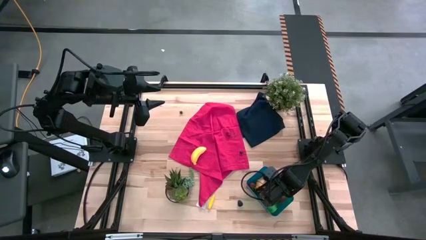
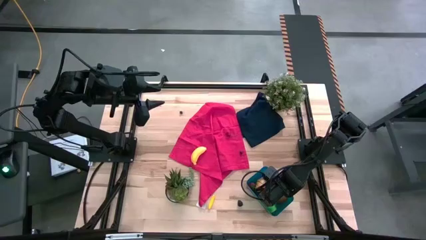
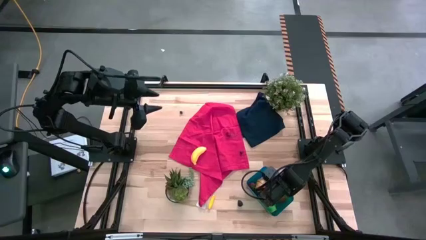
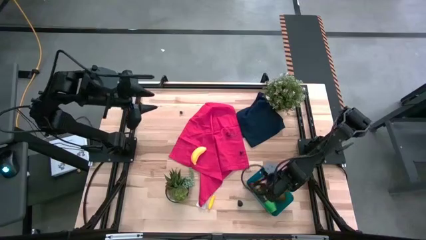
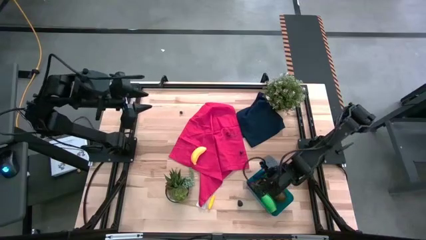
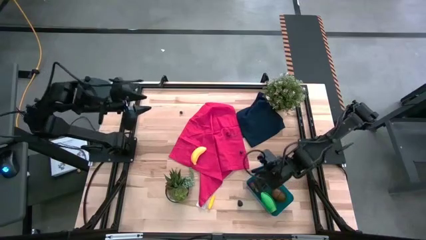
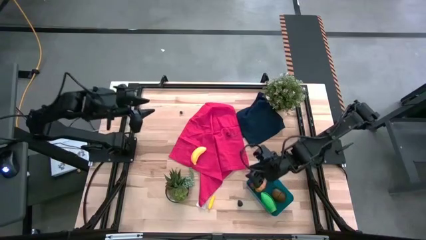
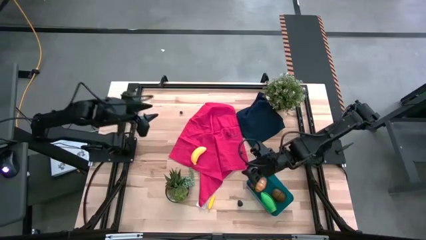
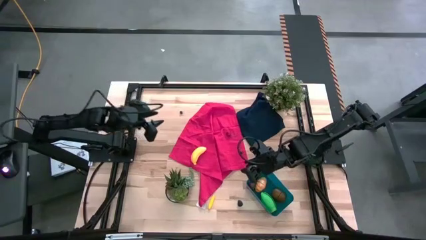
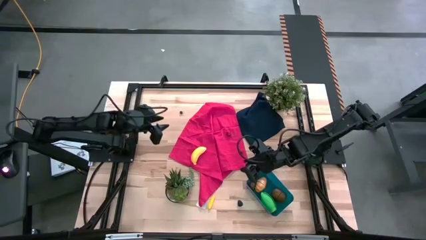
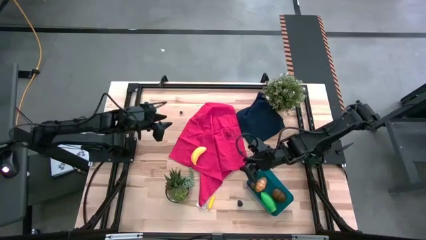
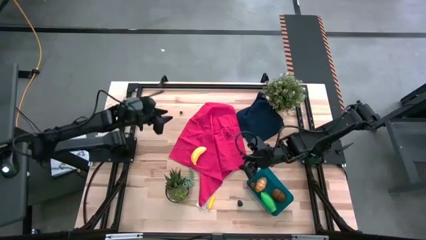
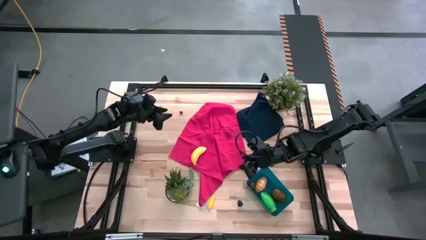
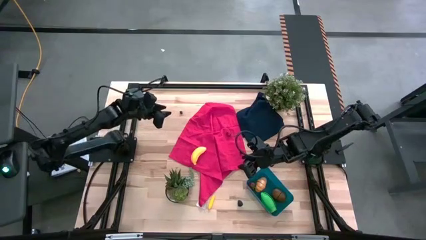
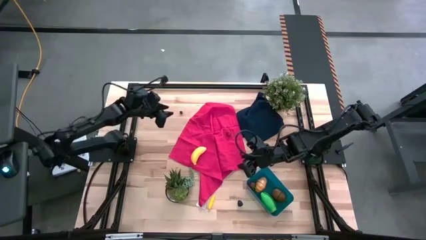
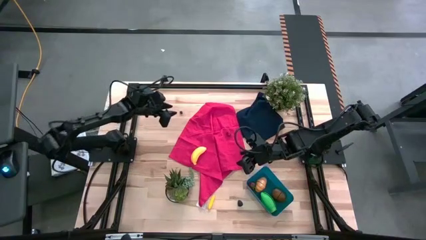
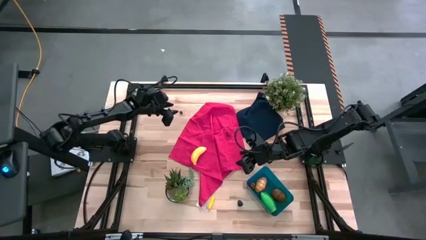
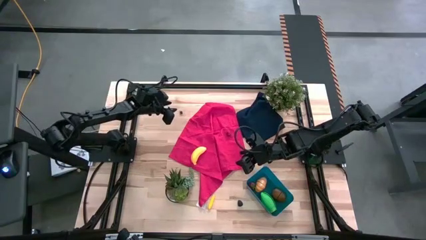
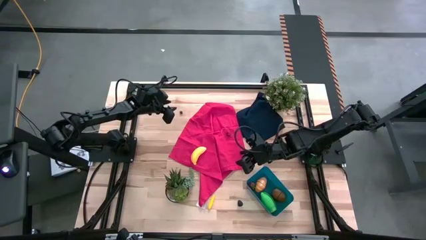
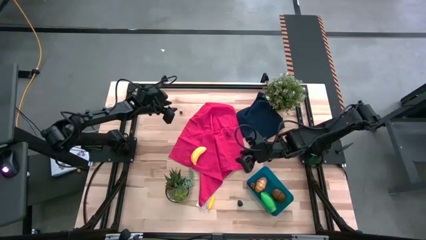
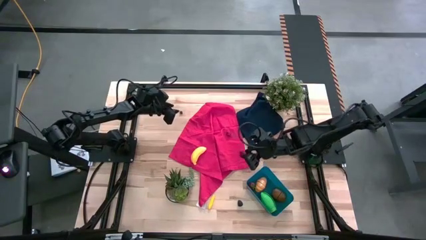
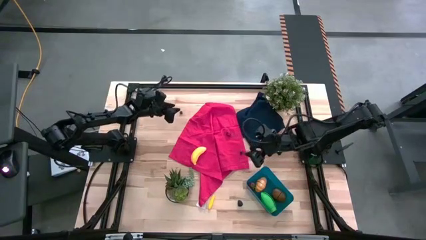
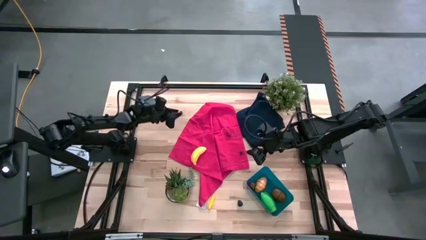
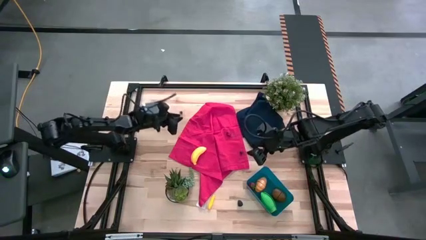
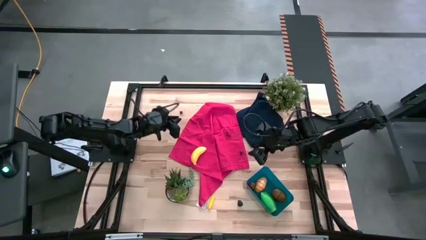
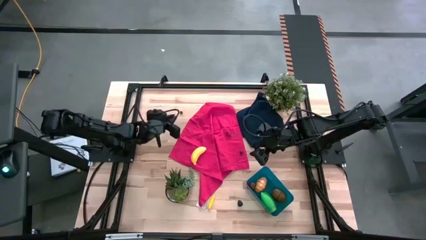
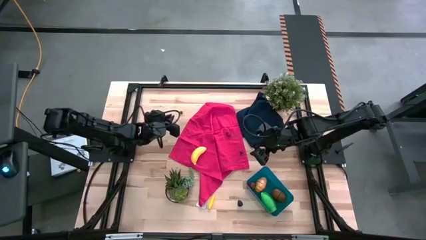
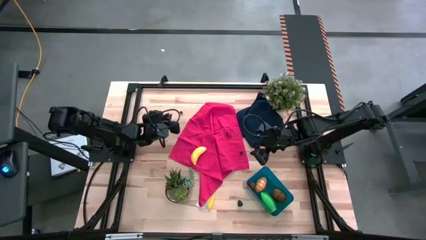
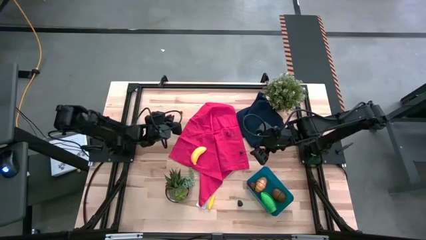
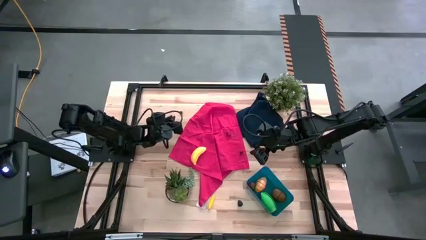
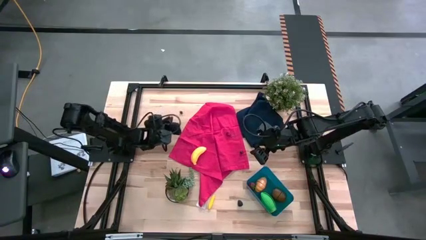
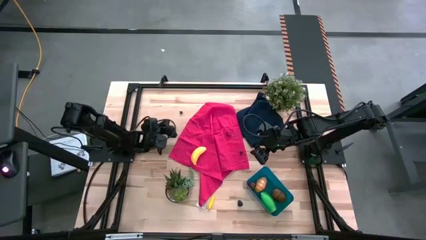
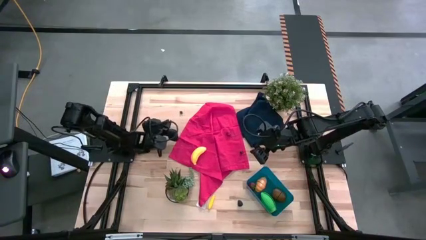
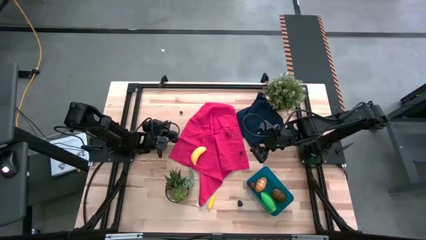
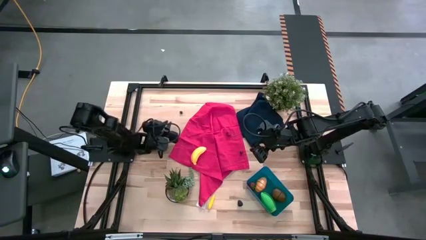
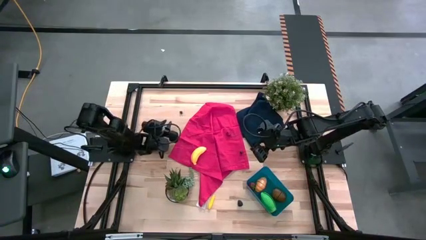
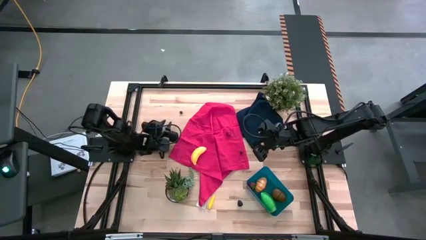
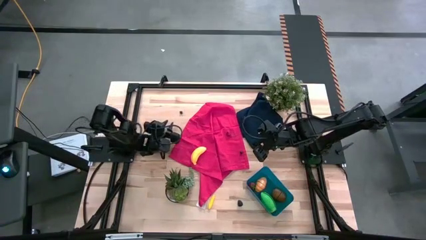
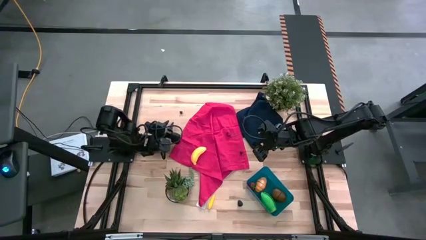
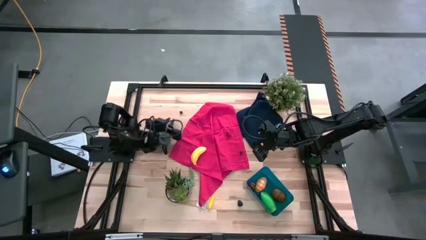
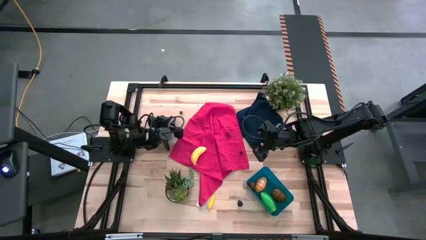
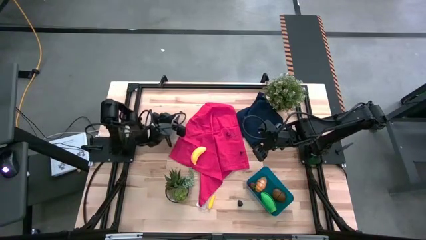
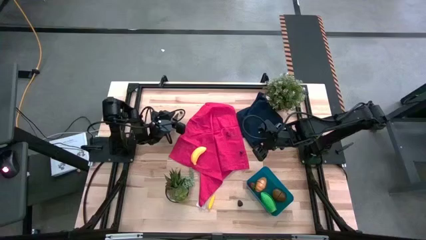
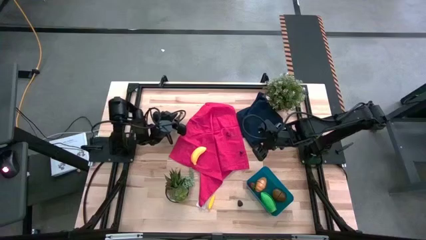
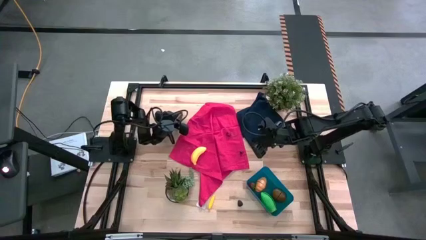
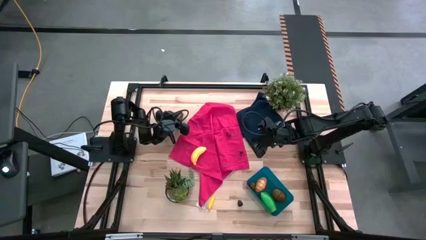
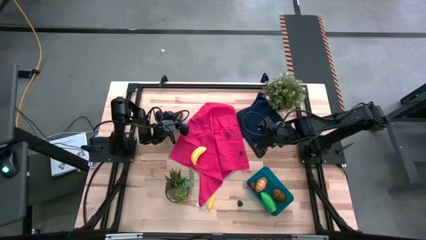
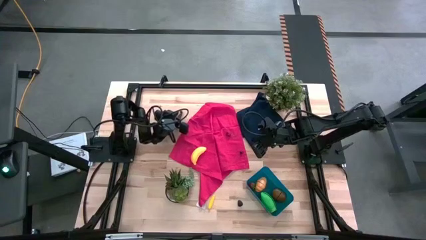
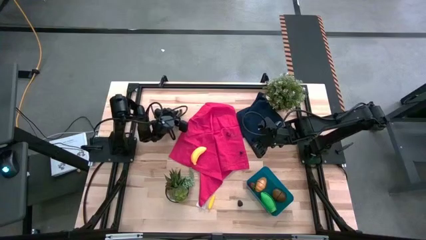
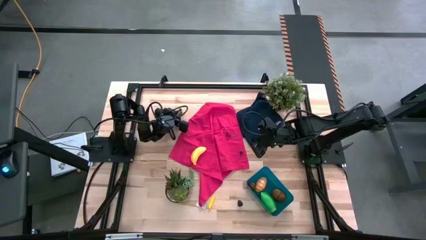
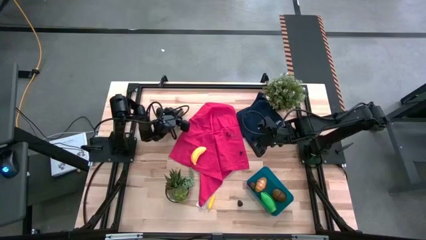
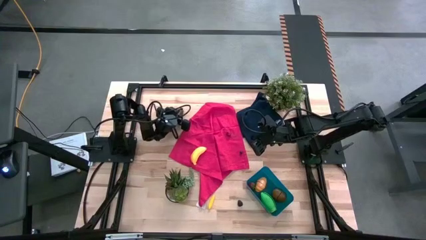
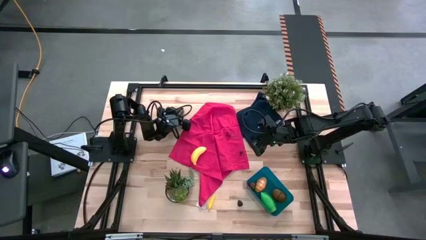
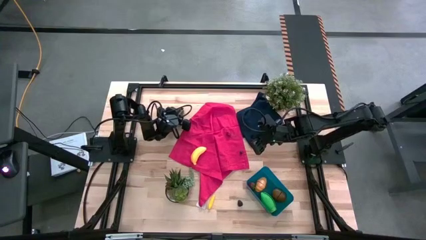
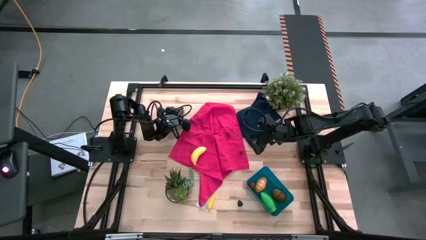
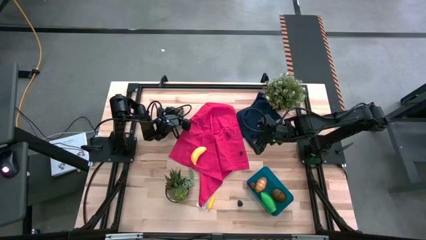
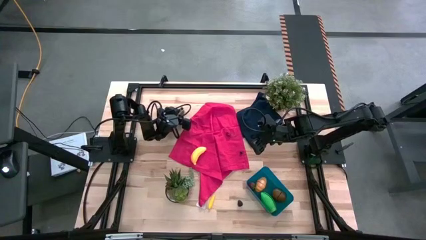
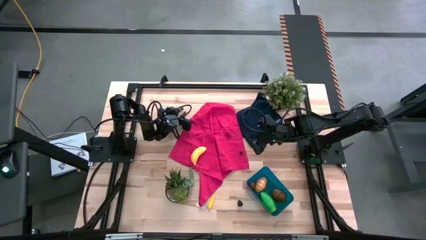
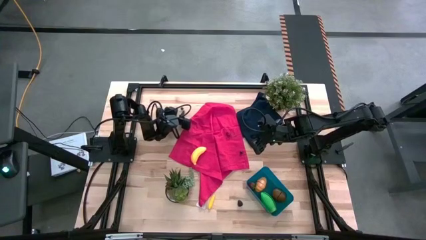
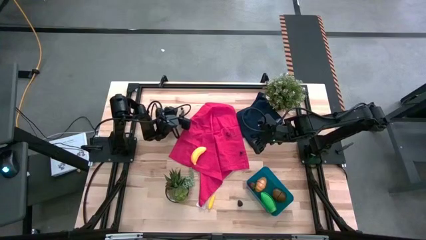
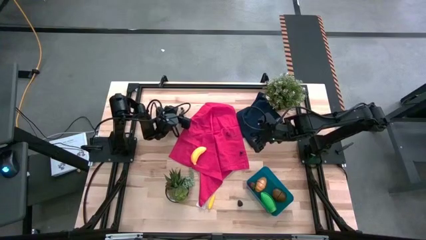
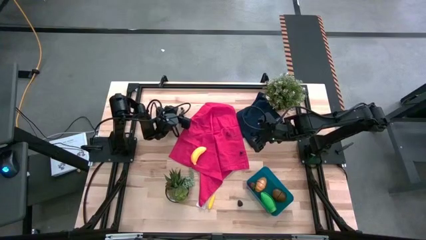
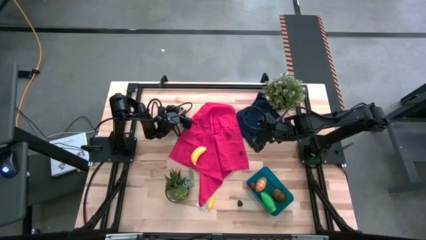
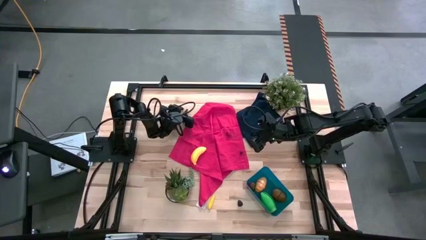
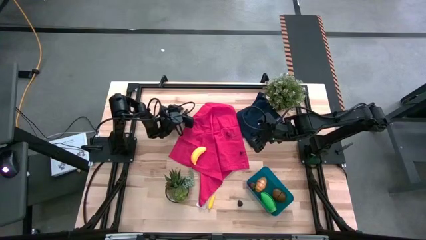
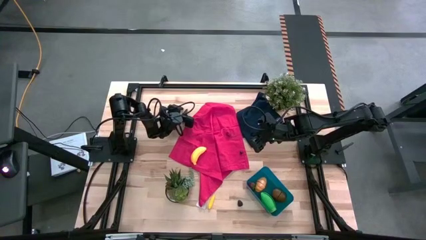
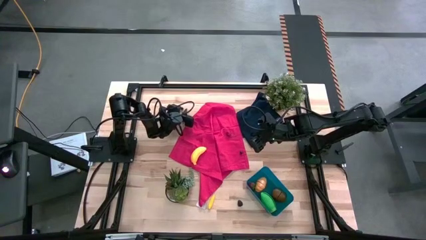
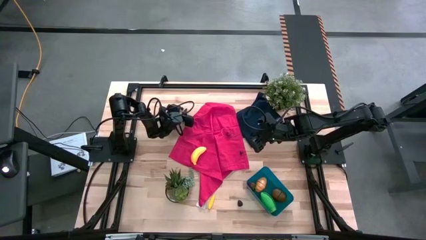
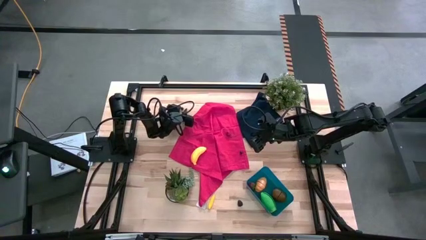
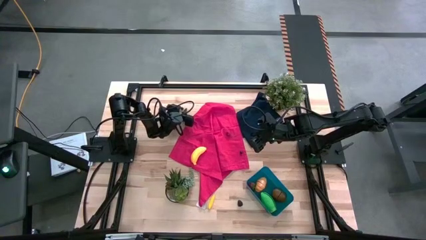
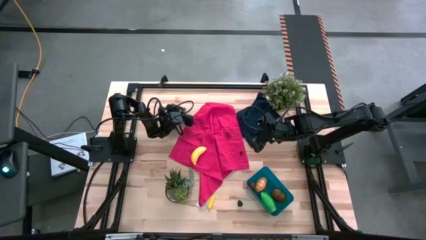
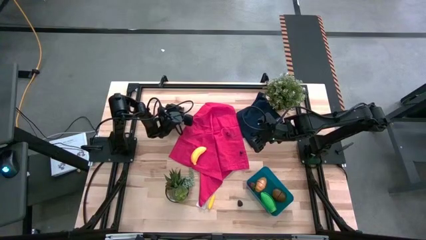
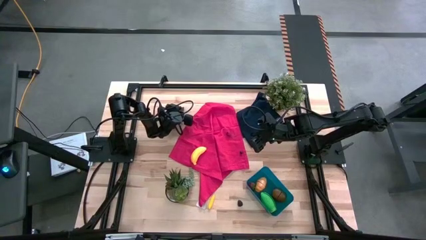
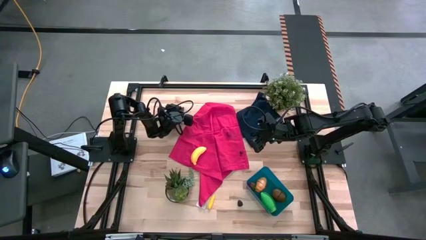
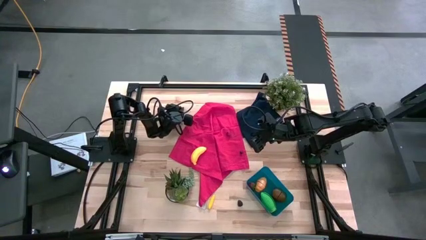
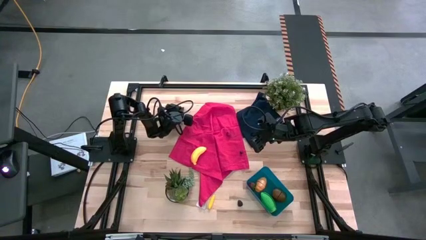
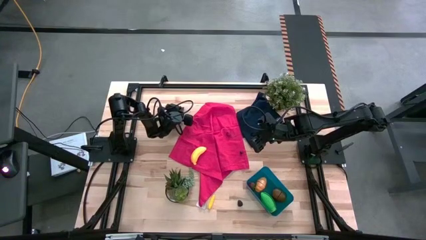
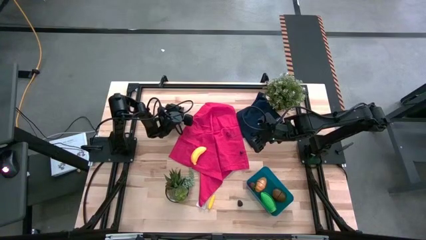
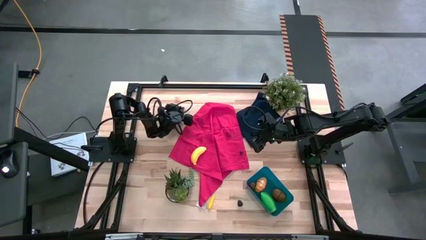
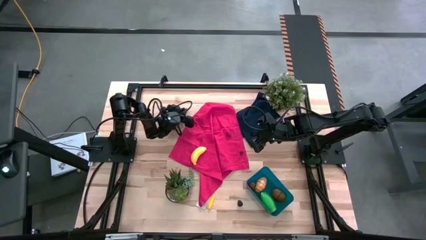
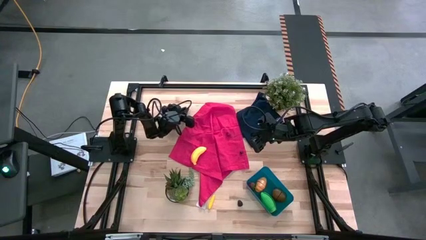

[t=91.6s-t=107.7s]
Task: Pick and placing Produce into tupperware
Put the top blueberry into the blue bin
